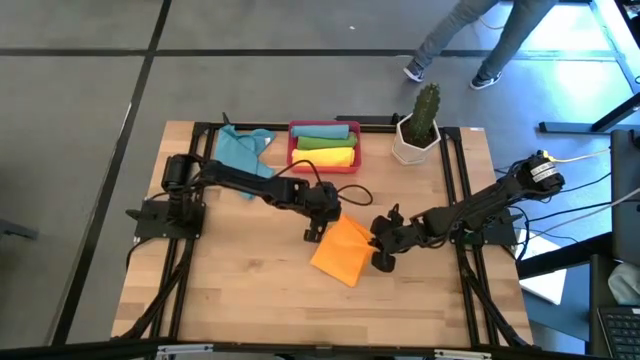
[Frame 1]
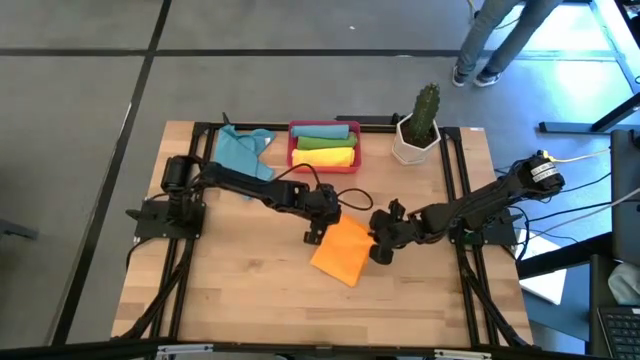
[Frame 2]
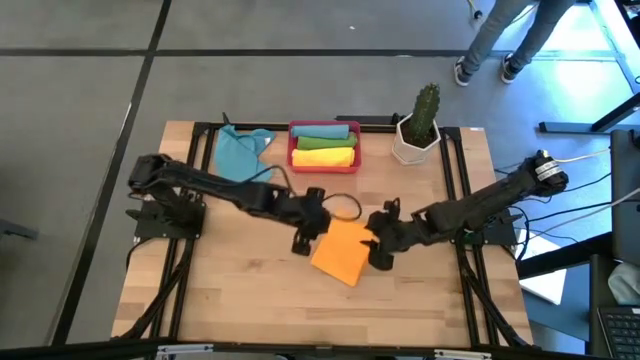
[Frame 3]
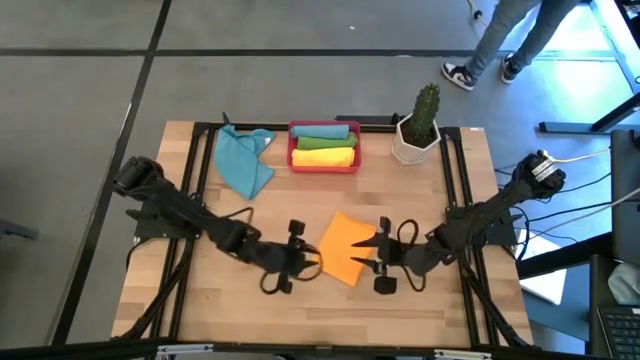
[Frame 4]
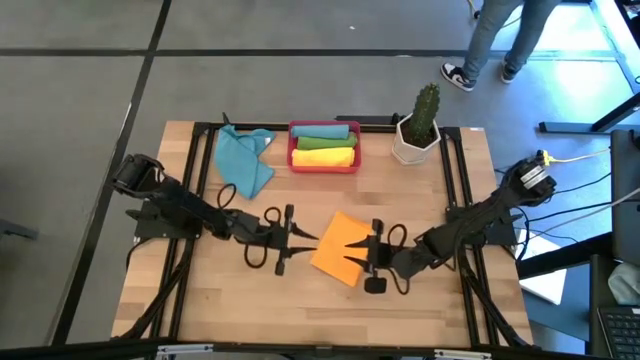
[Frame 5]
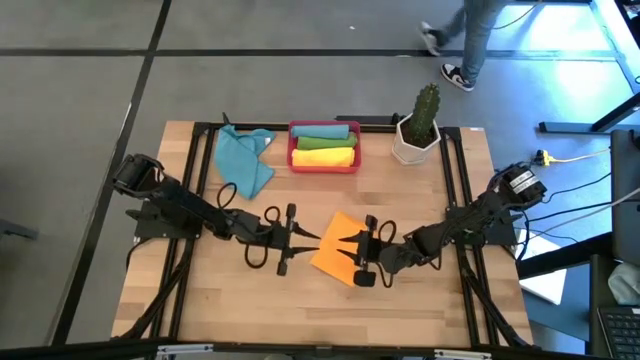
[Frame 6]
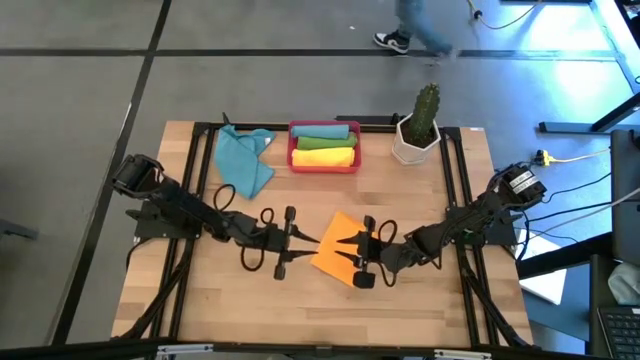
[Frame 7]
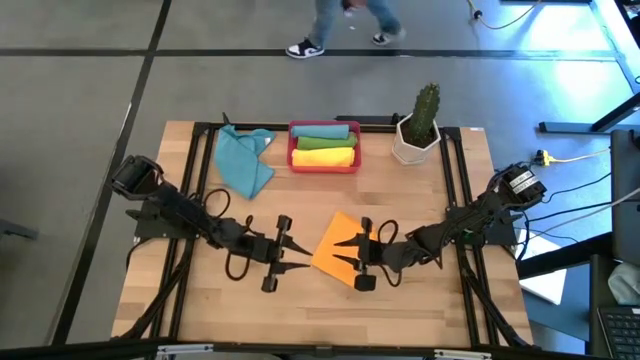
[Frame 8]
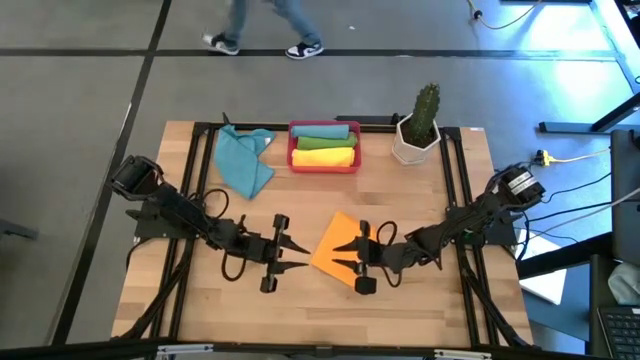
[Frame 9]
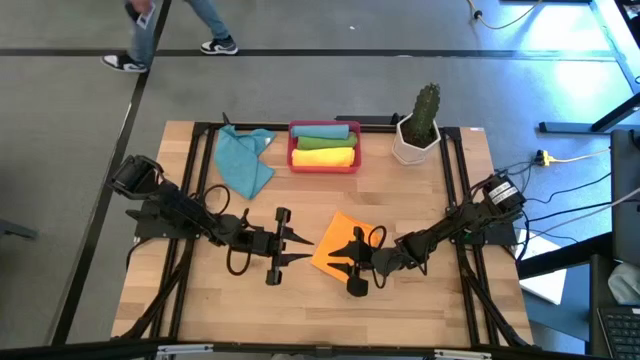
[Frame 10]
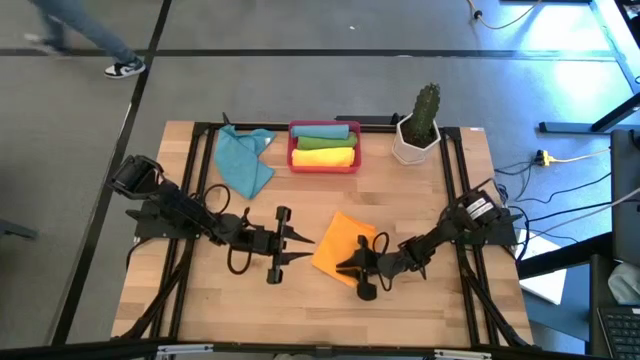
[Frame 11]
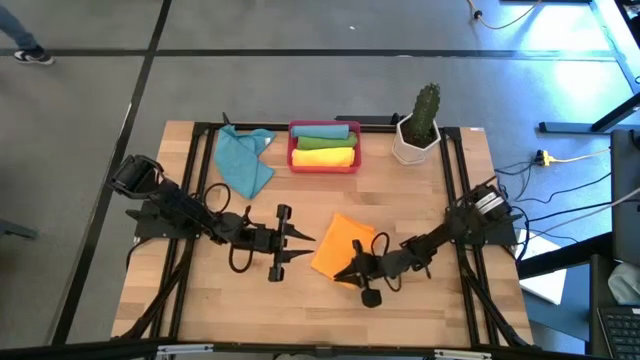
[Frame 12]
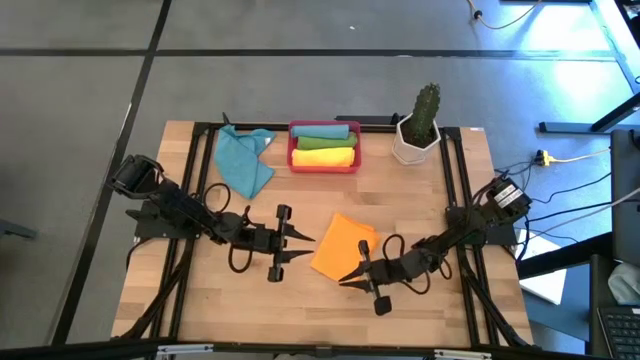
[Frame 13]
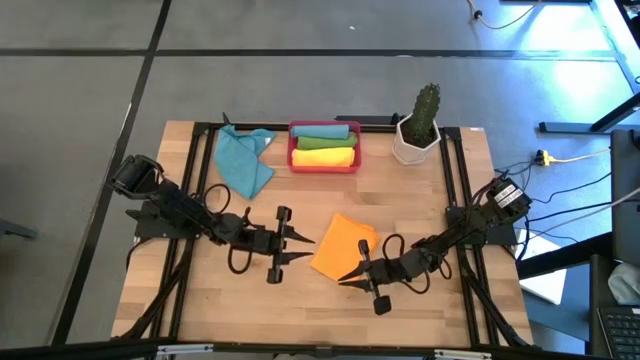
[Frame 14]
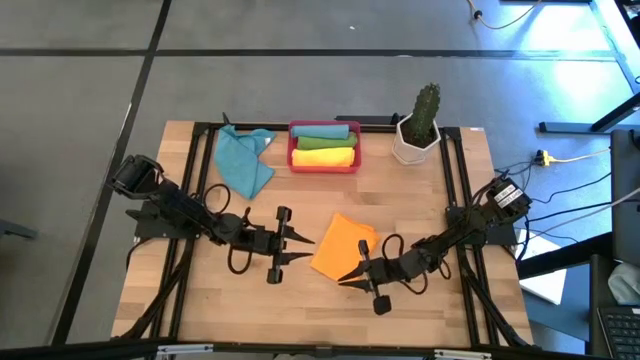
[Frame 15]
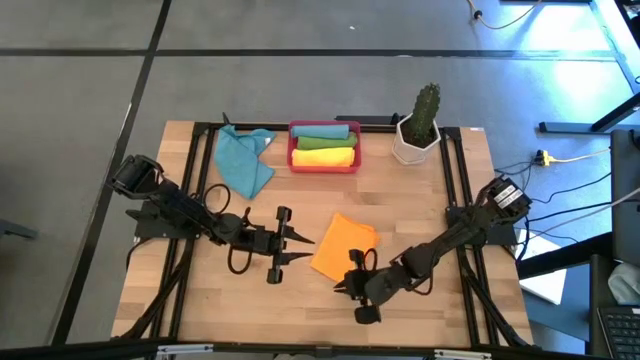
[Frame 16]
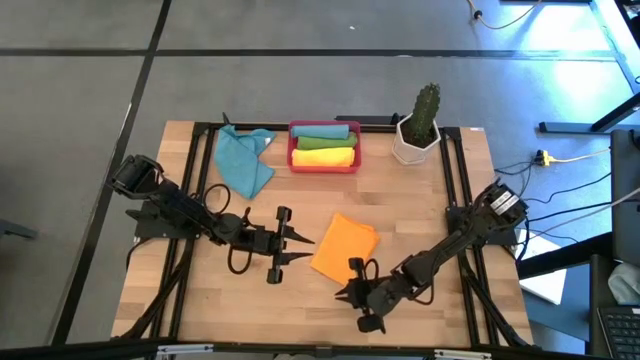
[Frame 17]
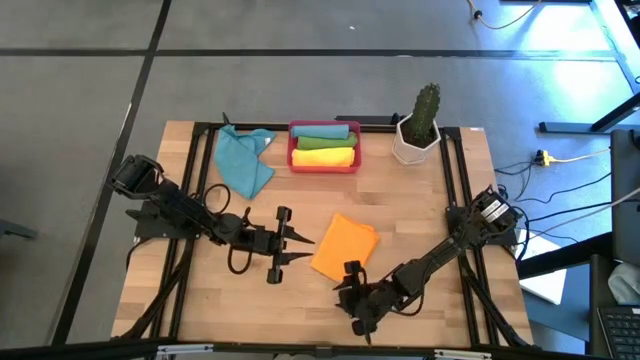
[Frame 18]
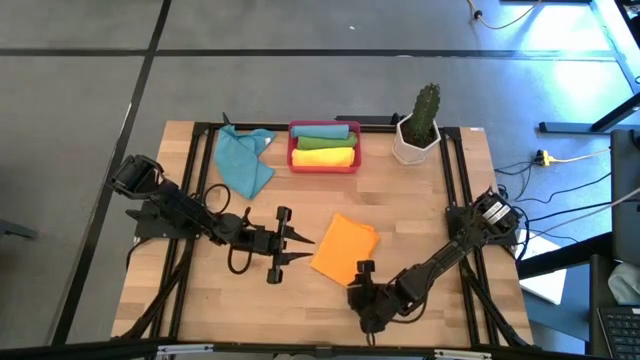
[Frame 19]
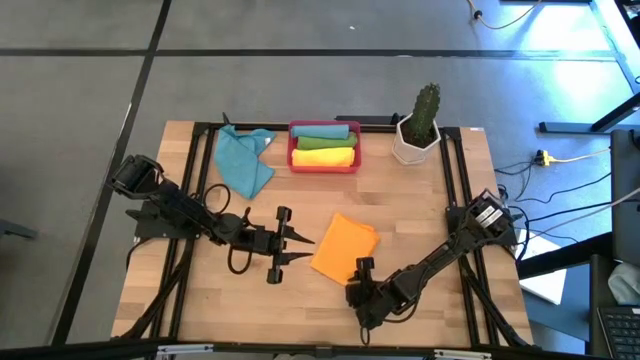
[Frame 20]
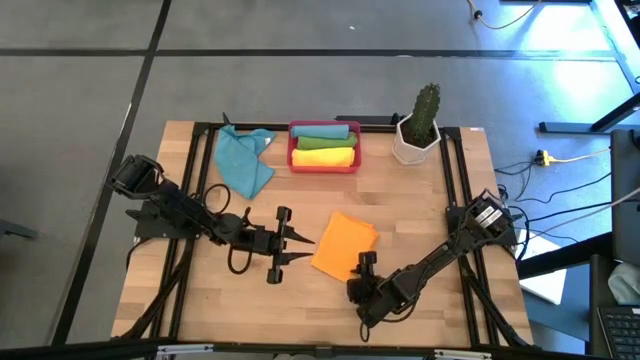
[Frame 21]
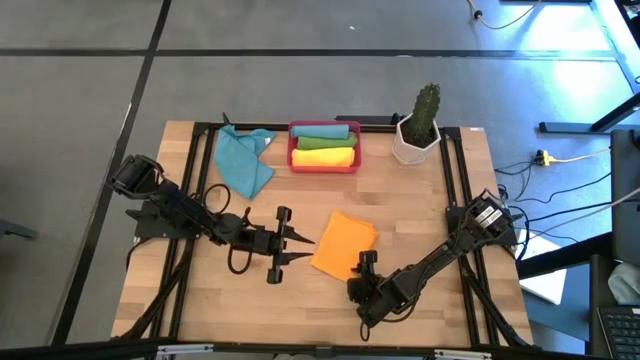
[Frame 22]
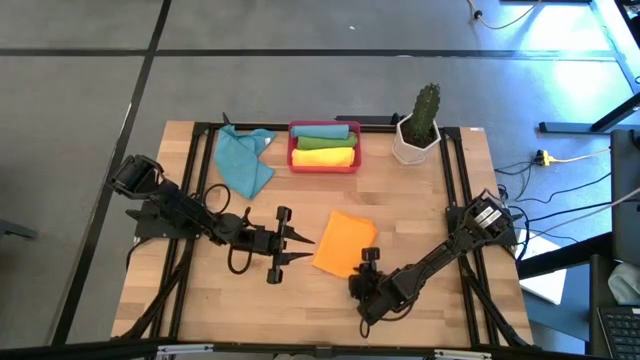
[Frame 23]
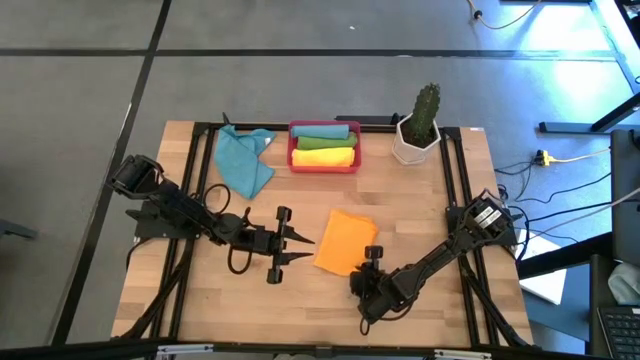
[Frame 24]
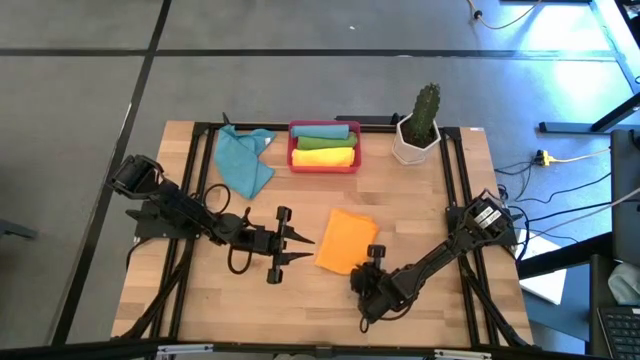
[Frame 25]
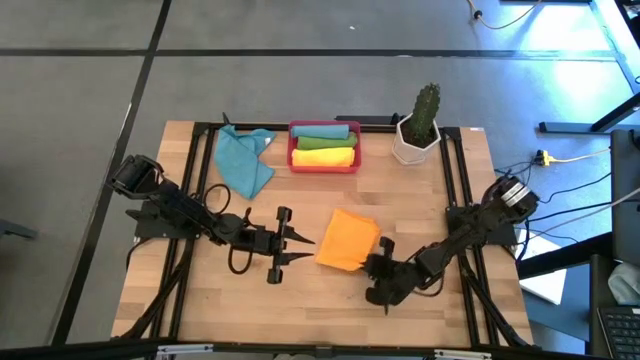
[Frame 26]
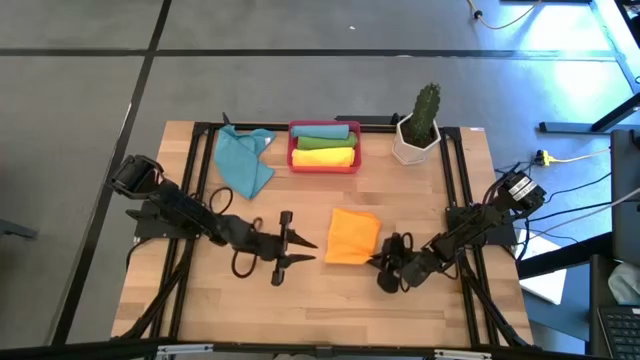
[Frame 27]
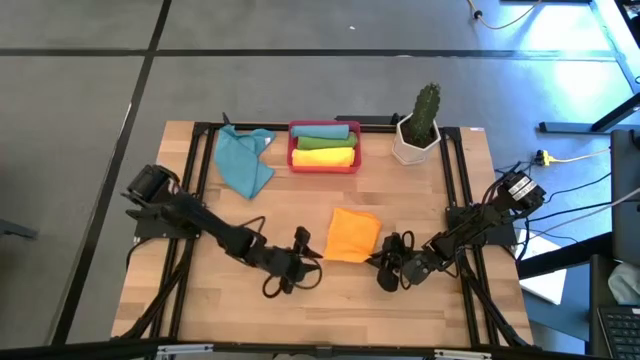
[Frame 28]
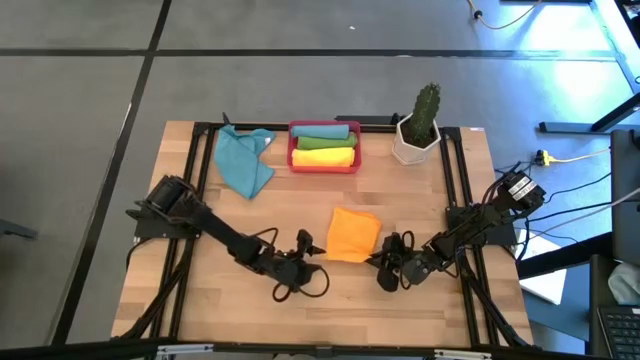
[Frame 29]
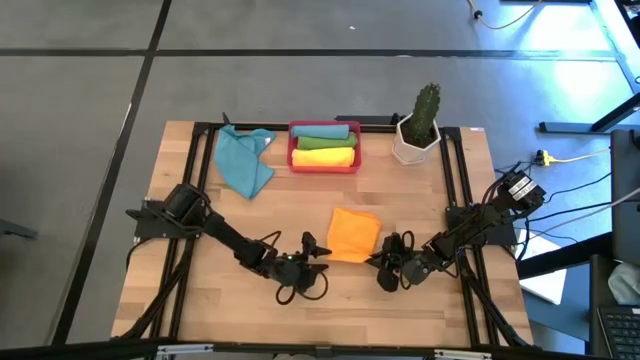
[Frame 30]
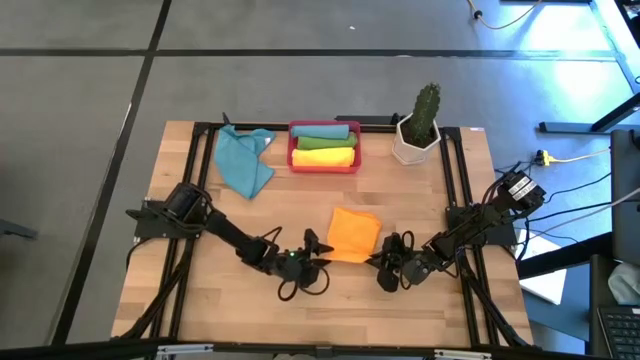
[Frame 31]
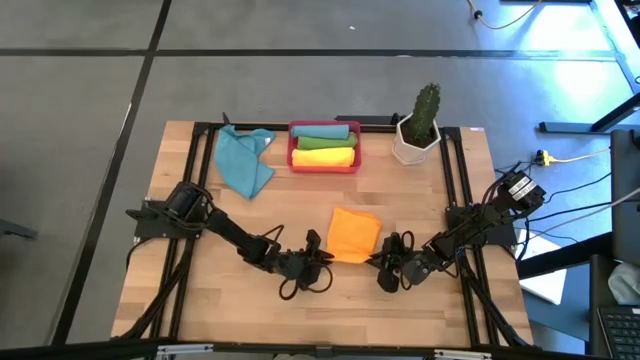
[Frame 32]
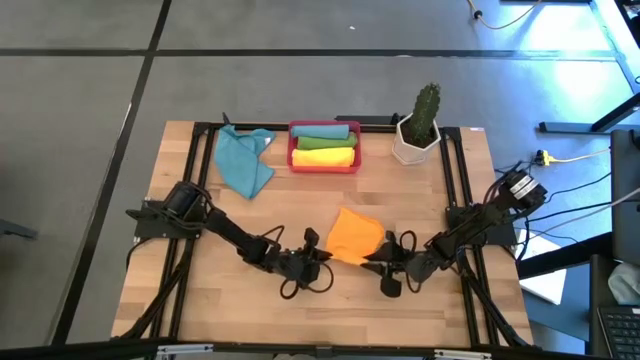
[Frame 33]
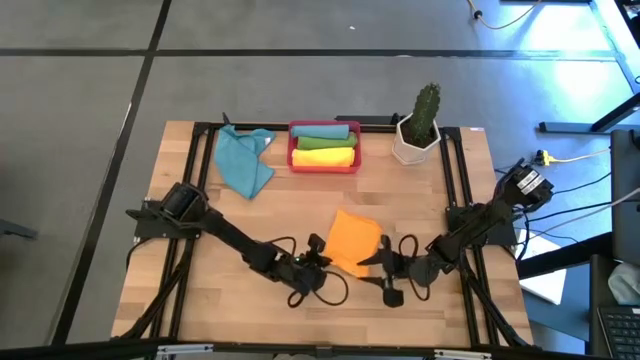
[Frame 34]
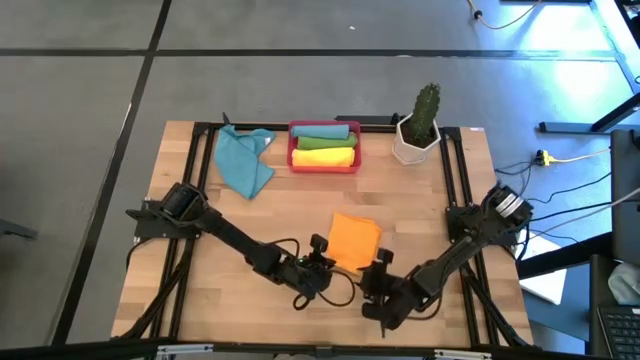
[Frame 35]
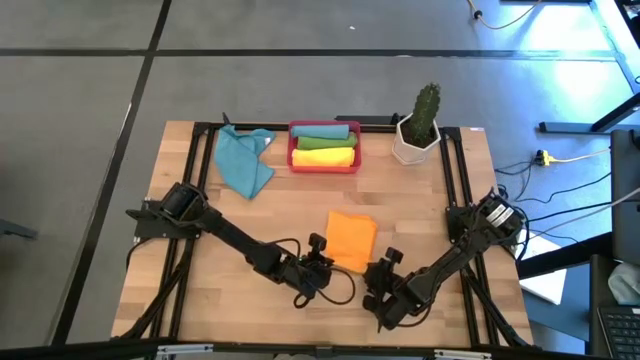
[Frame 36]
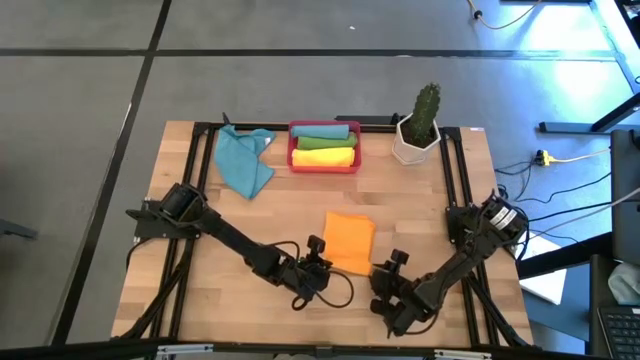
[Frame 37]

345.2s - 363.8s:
Task: Roll microfiber towels into tight, uniform cylinder then place into a basket
Roll the orange towel

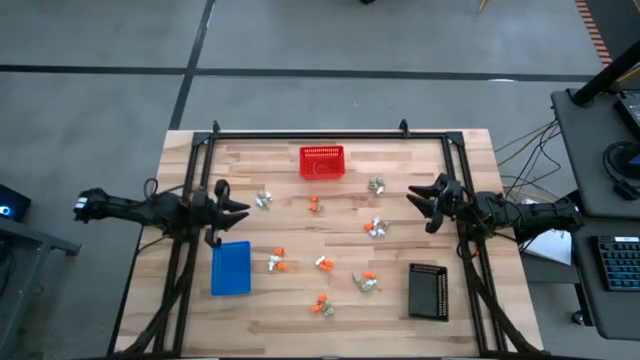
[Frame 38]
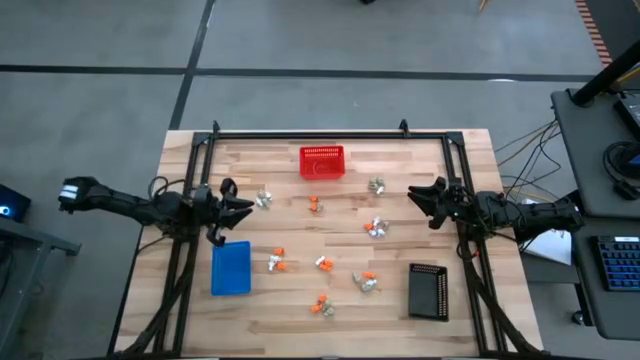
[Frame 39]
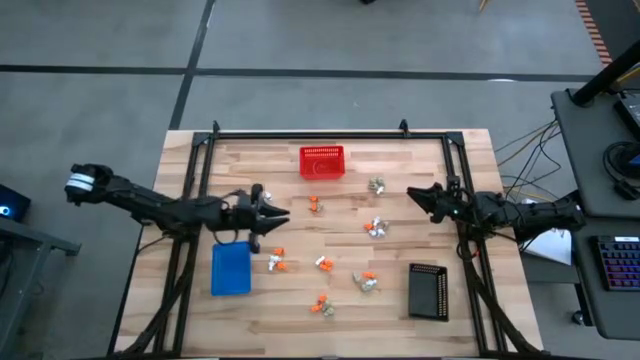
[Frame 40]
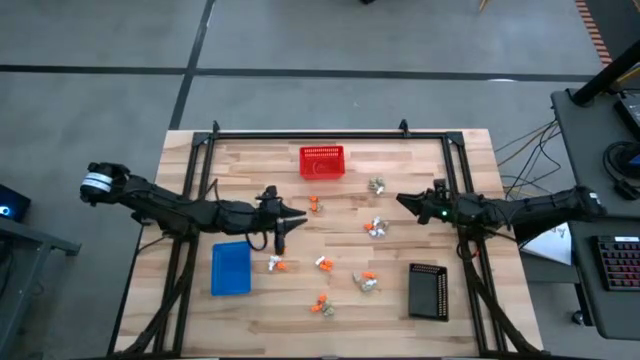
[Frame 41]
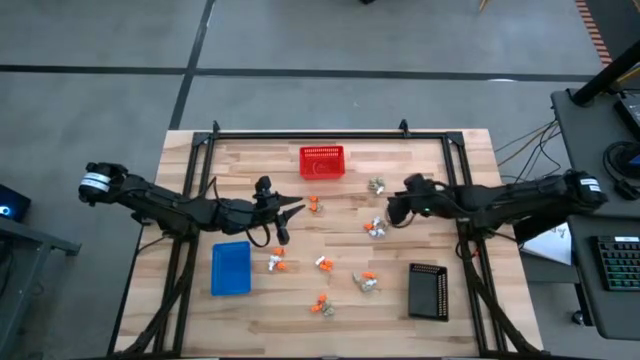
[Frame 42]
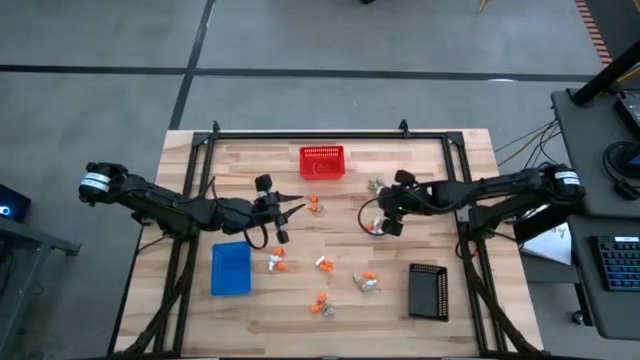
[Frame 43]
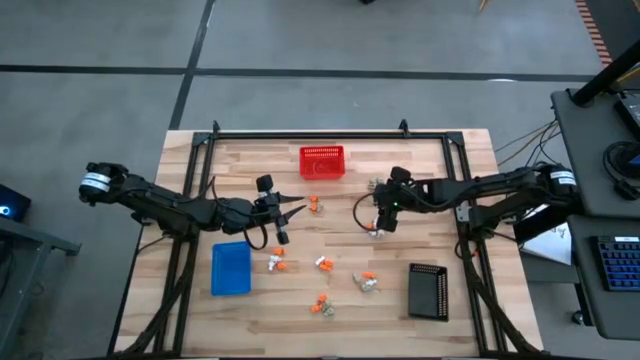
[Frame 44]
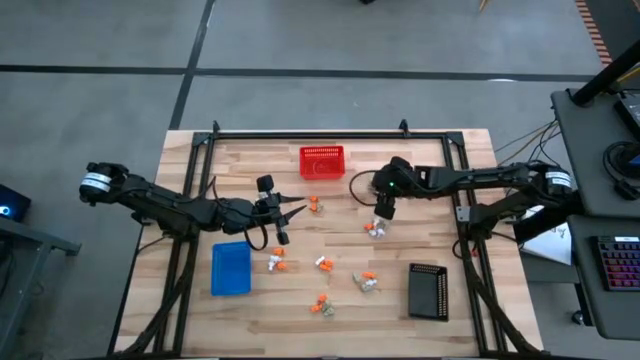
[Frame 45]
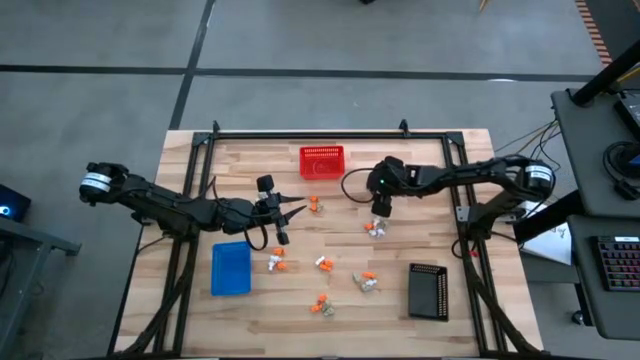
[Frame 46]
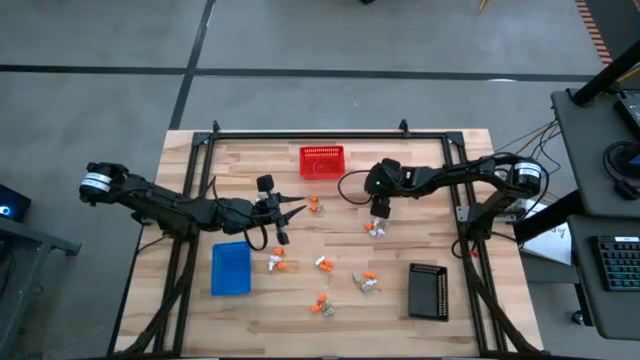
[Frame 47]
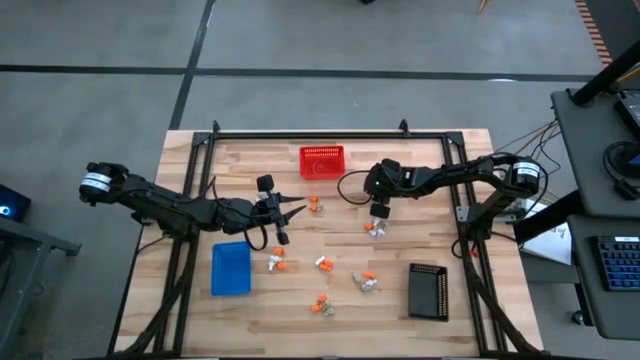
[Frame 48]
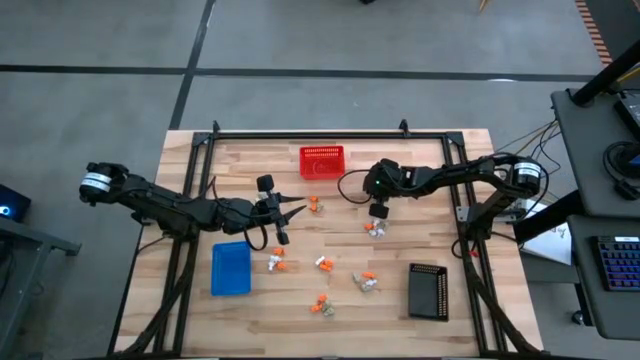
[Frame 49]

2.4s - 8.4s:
Task: Sort Halloween decoration
Put the gray skull toy into the black bin
